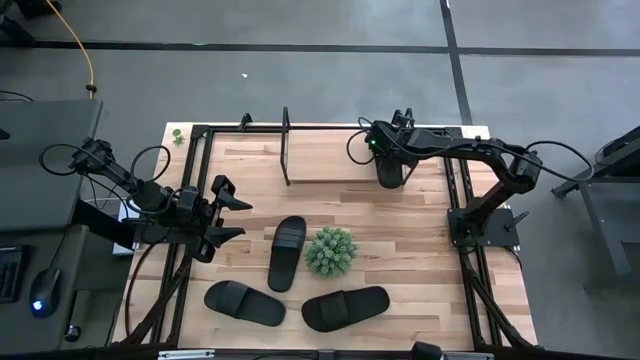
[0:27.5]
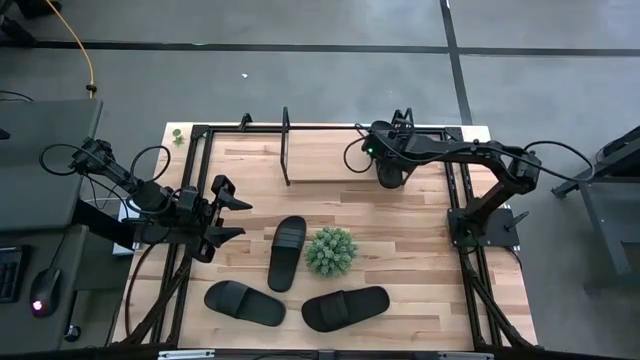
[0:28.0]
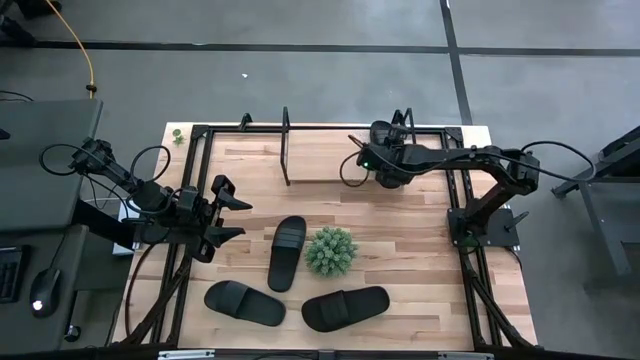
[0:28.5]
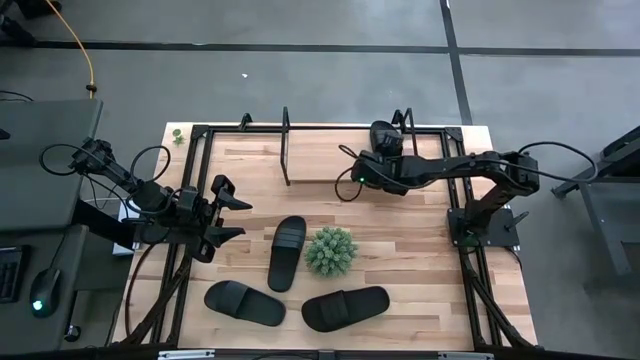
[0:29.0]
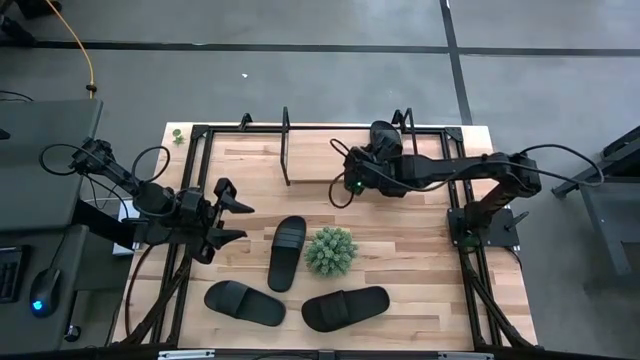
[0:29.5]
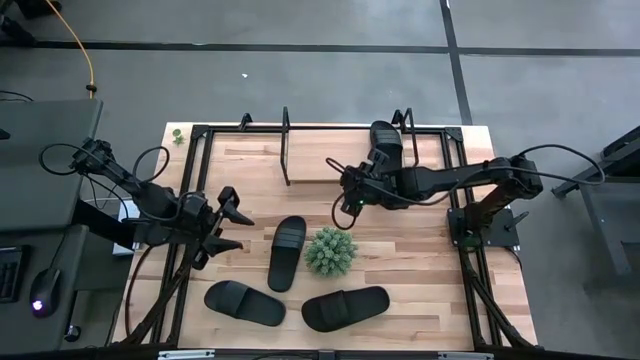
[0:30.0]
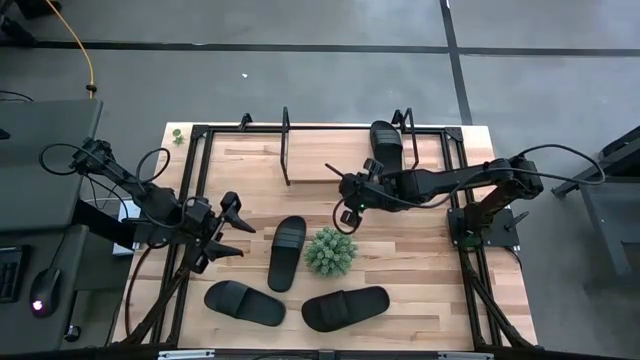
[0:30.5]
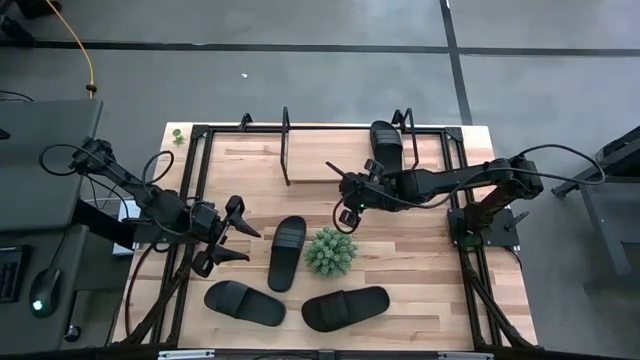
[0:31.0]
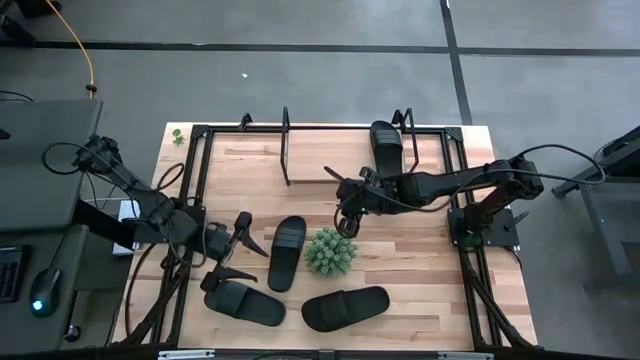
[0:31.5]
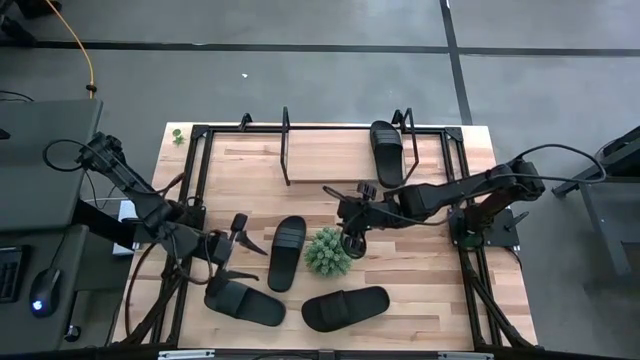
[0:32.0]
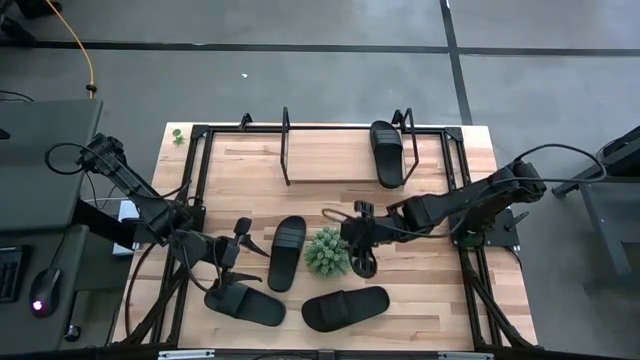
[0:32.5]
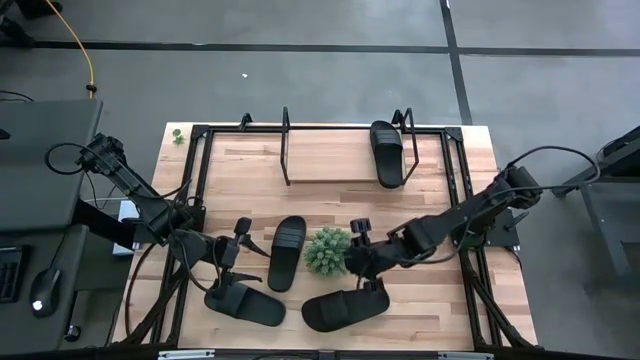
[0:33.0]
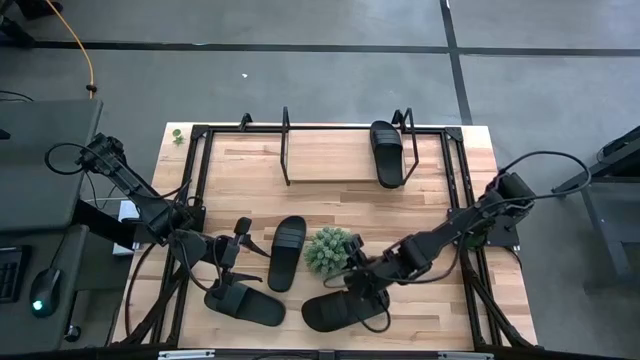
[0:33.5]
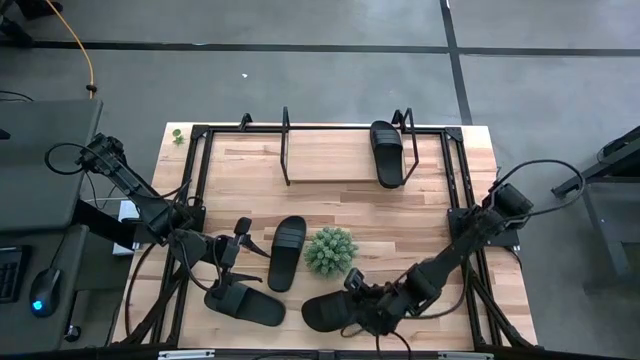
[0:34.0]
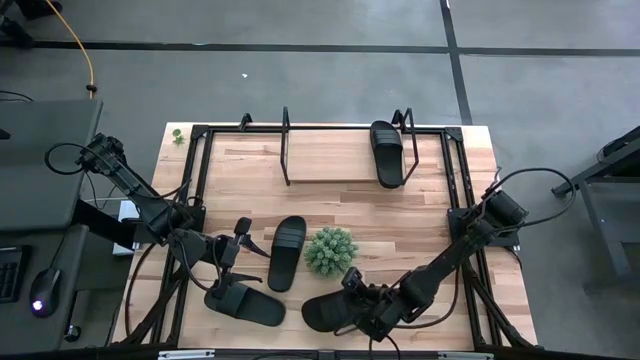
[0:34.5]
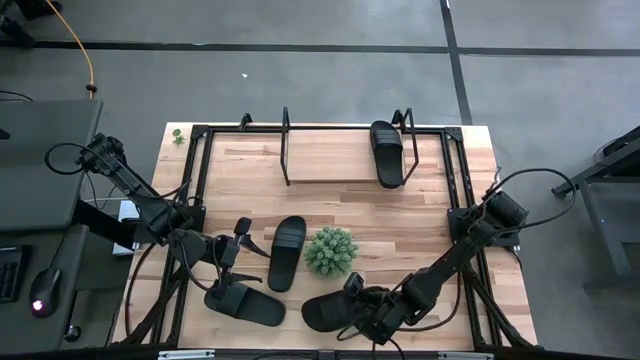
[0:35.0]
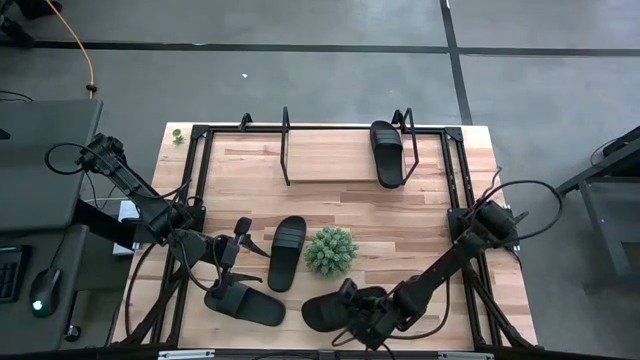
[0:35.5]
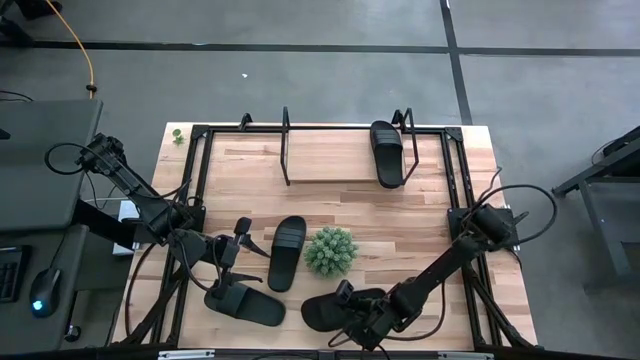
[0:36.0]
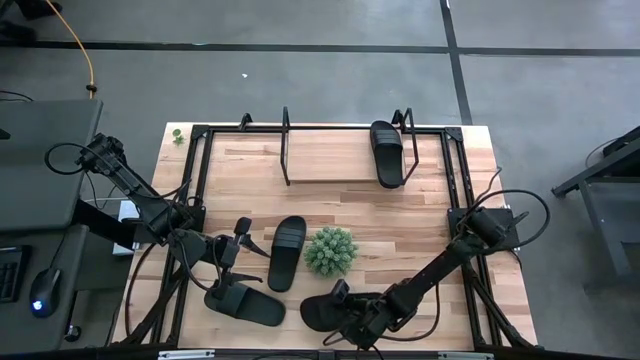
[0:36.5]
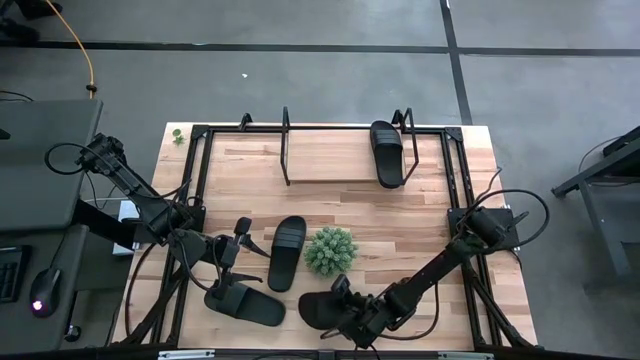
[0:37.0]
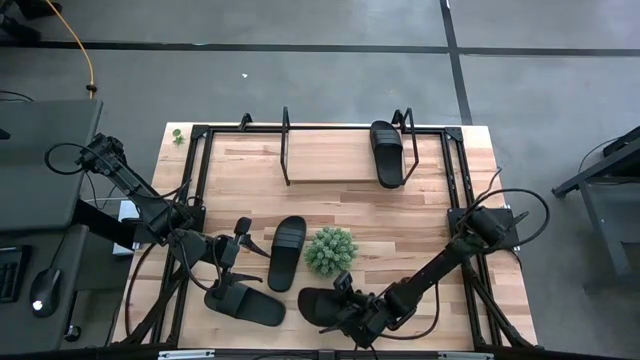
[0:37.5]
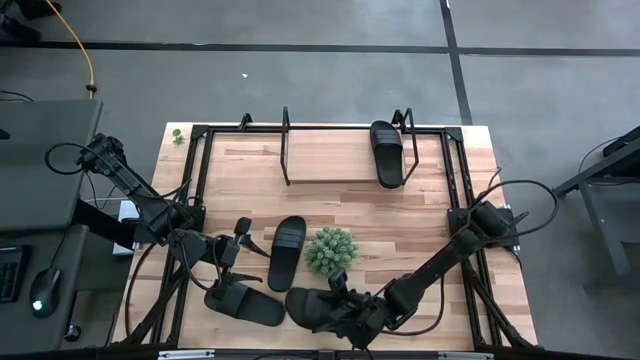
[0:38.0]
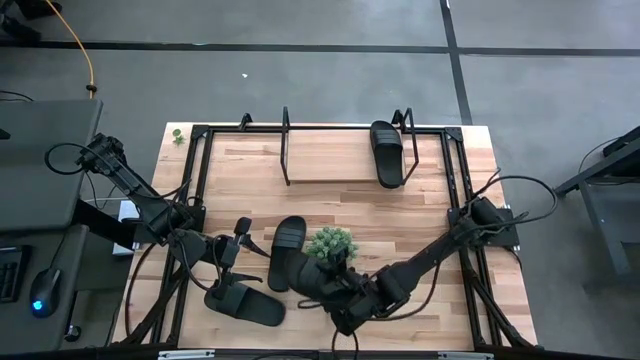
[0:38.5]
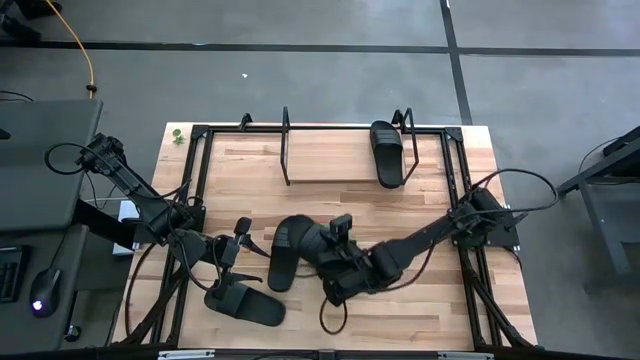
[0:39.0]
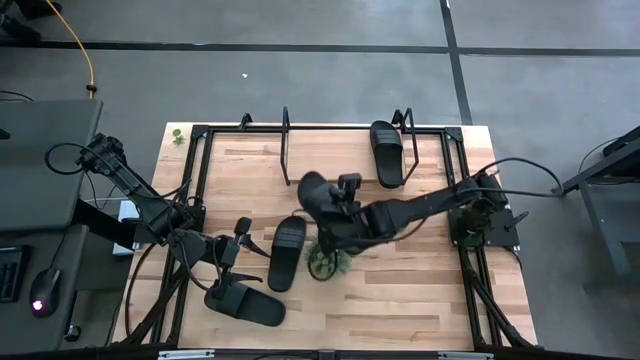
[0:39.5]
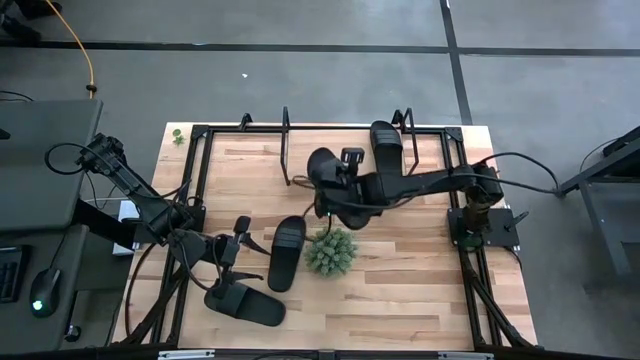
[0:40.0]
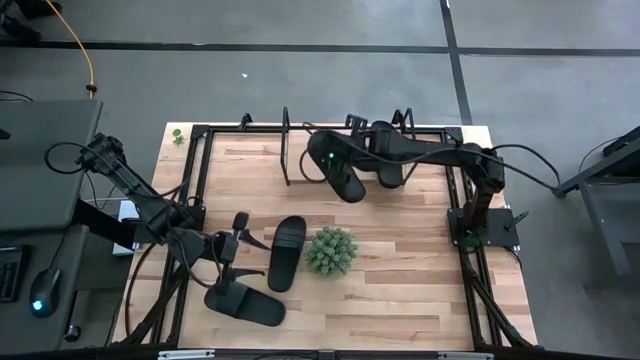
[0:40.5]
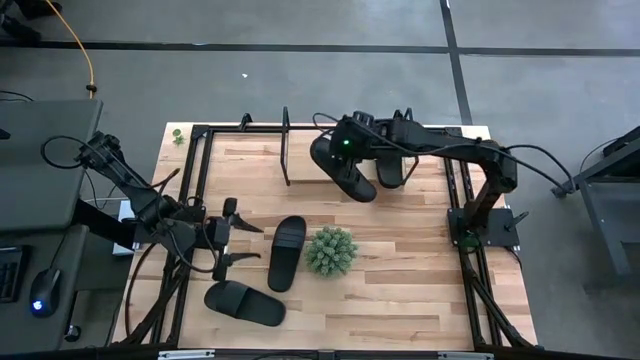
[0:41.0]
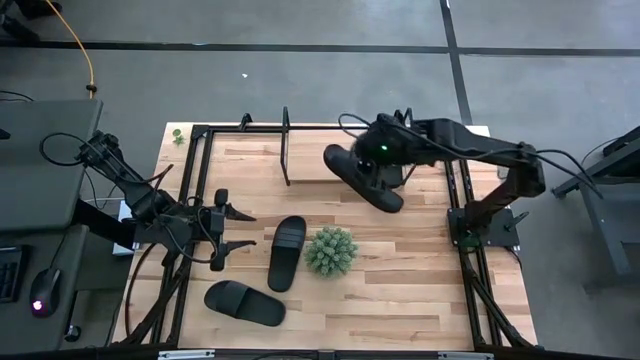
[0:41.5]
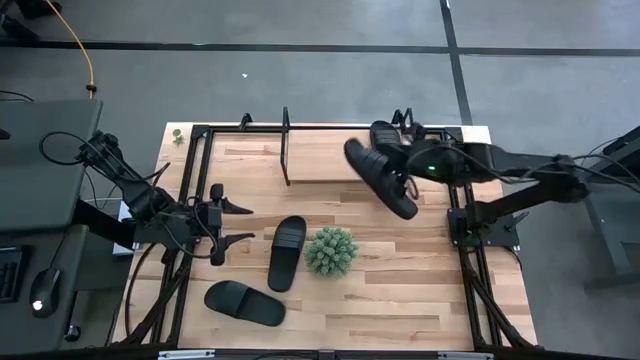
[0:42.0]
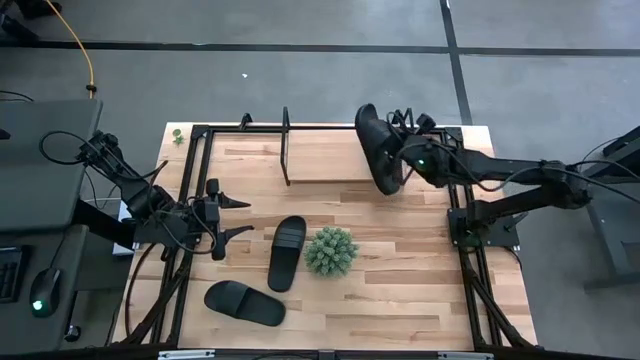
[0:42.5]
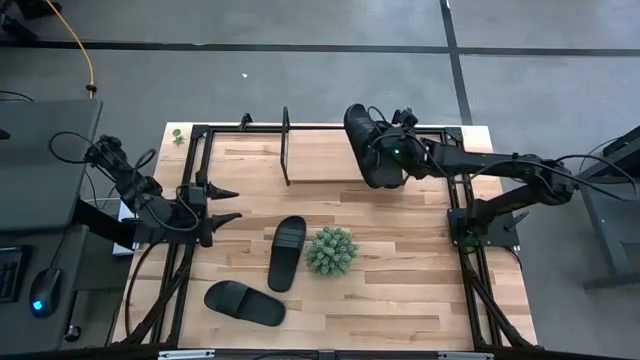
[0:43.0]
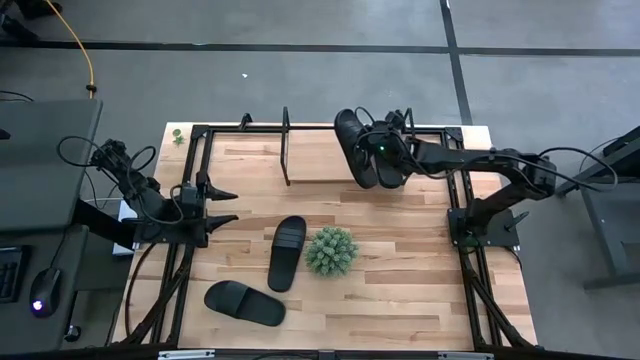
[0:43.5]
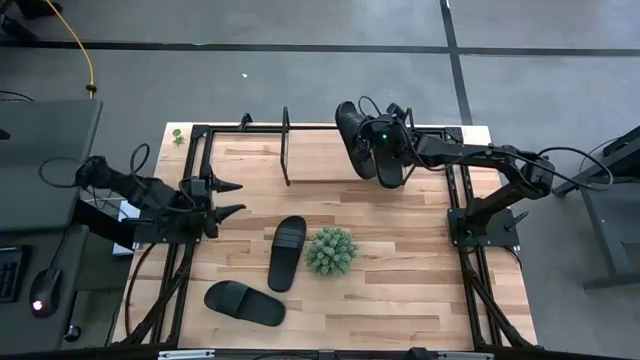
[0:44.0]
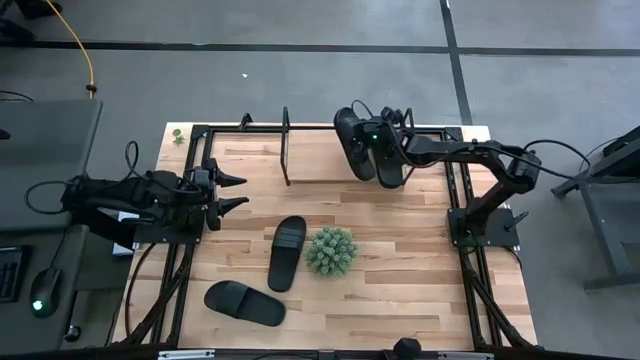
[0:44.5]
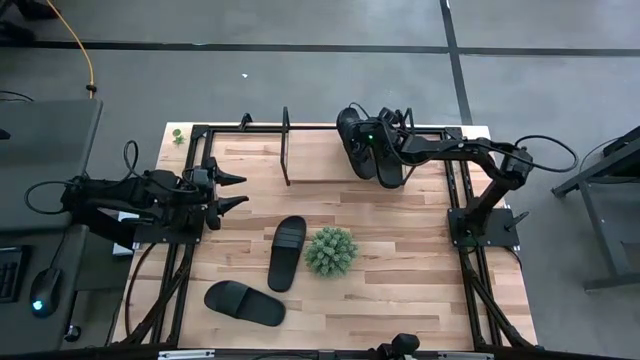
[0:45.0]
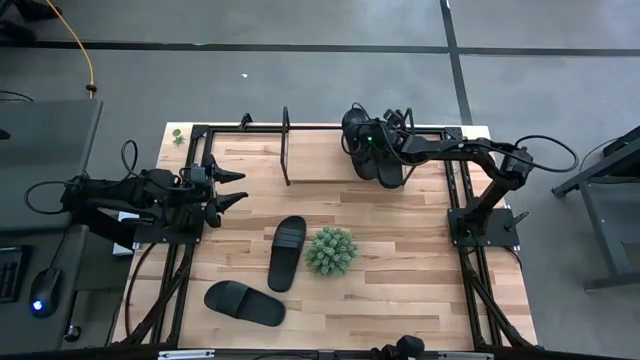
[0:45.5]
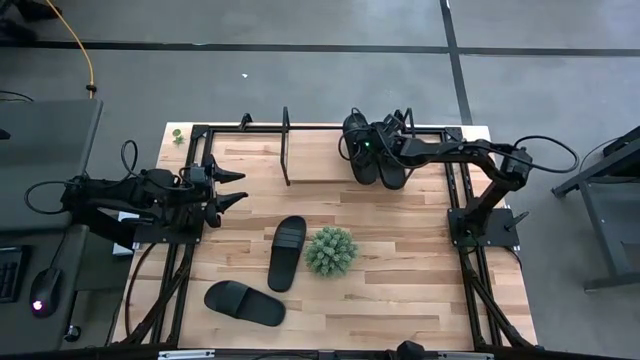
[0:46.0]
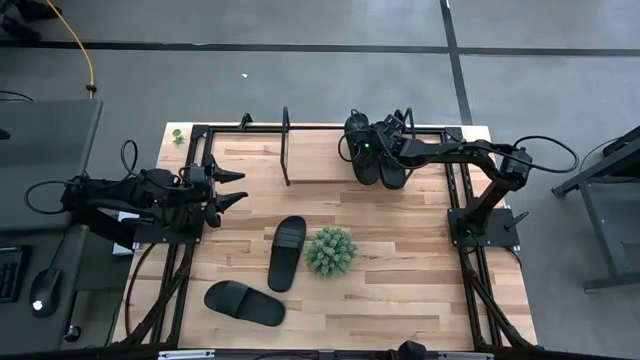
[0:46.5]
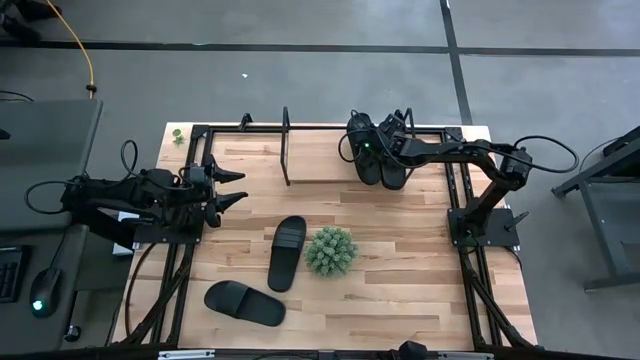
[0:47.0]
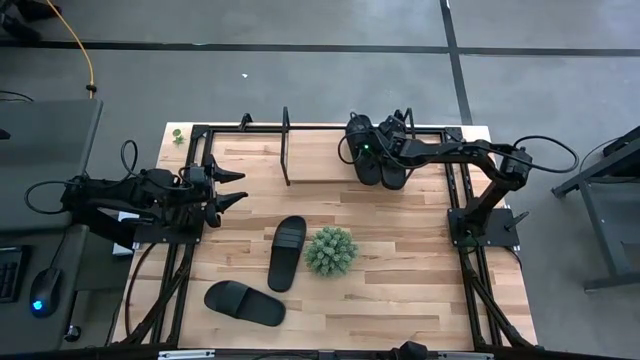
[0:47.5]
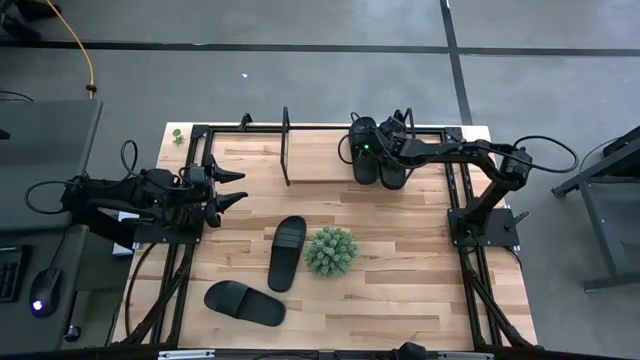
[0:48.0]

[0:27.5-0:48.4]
Task: Pick and place slides into the shelf
Put the bottom right black slide on the shelf
